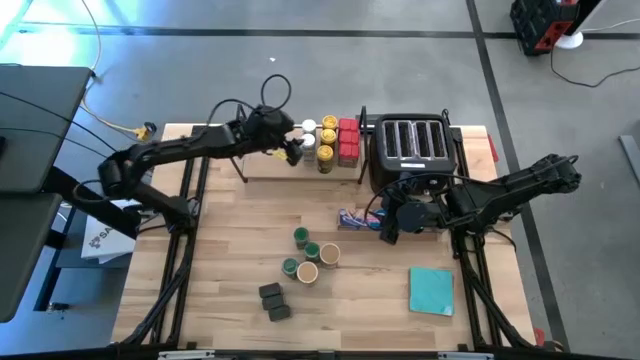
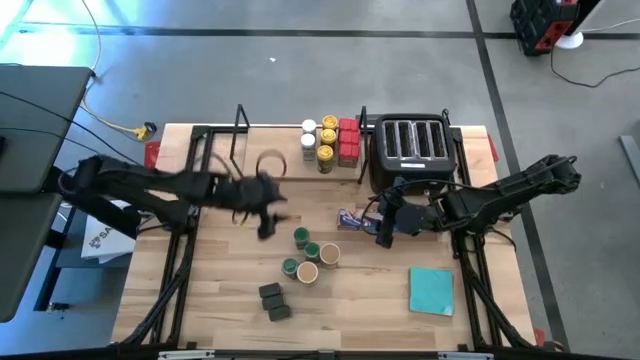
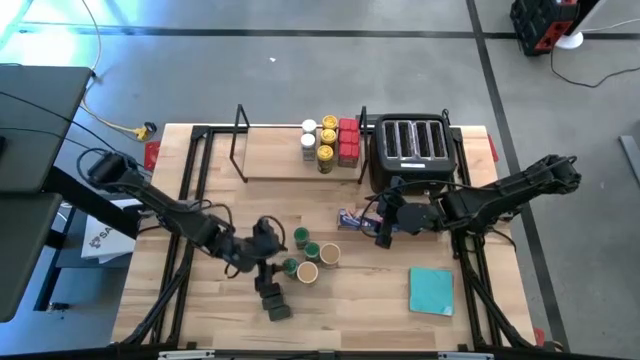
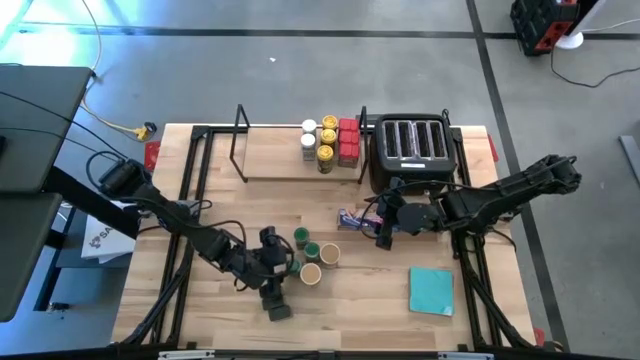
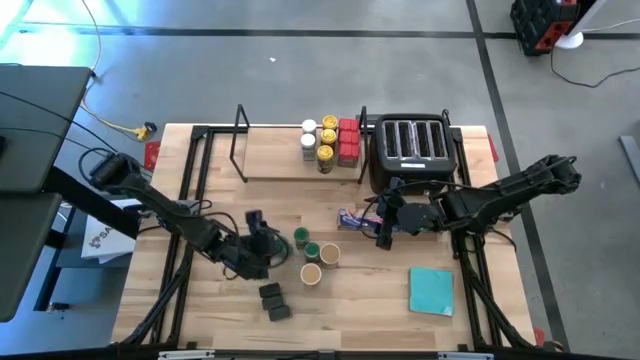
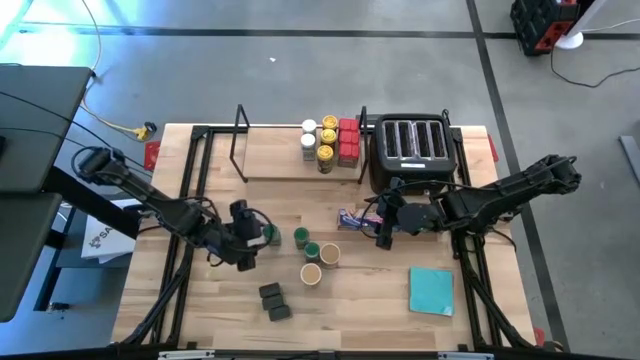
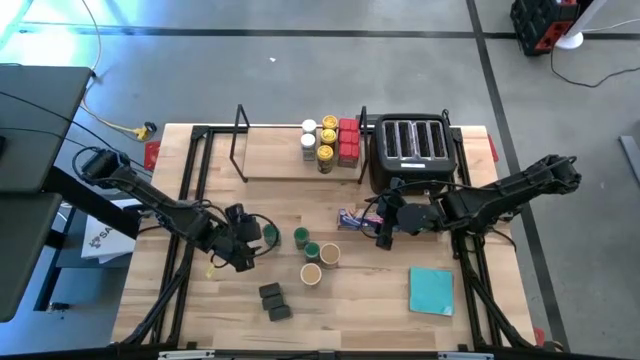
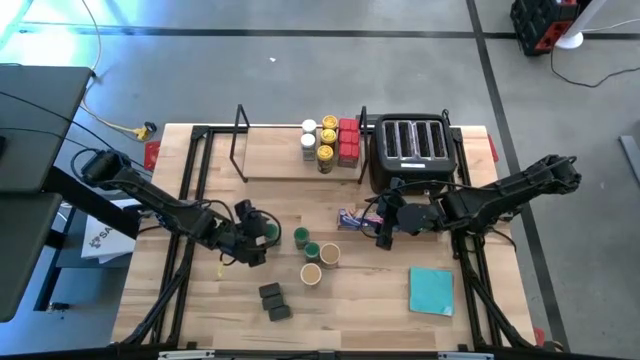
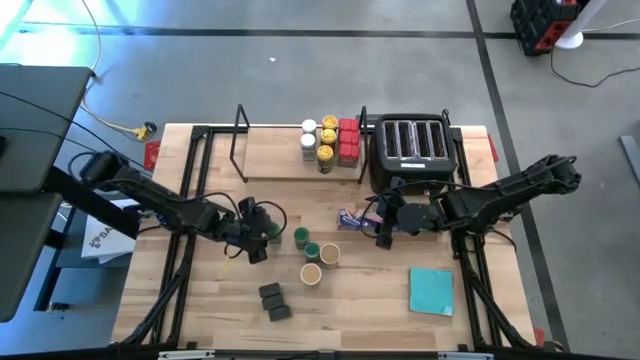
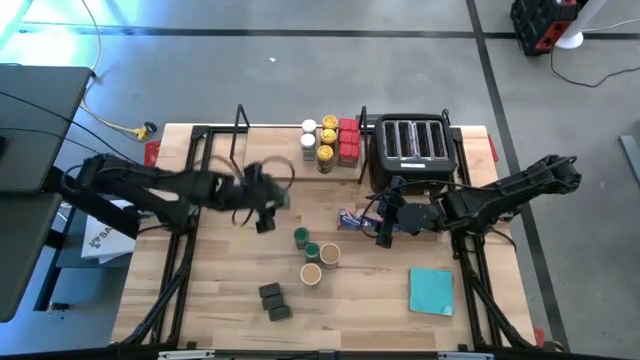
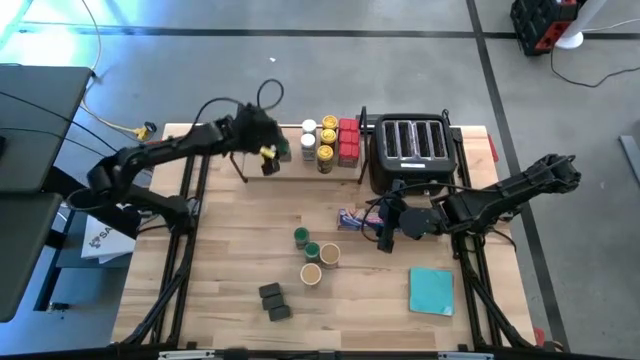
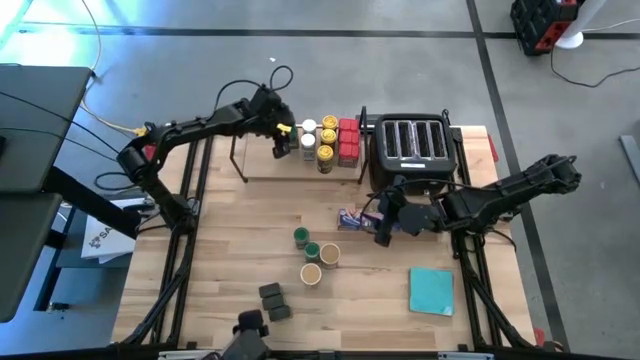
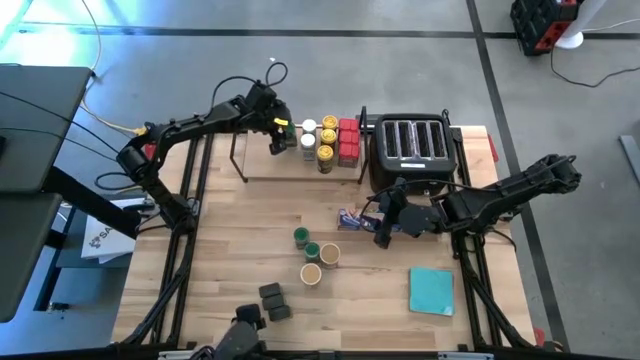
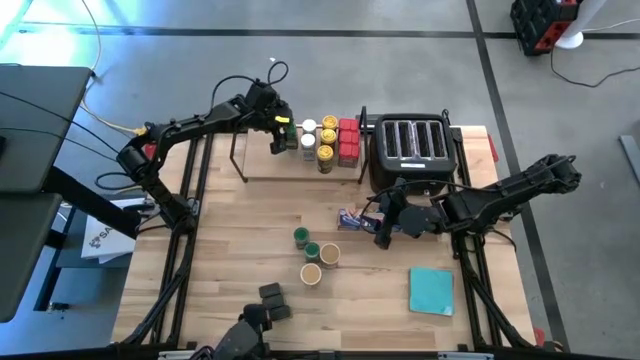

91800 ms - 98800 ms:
Task: Shelf spices
Put the bottom green seasoning bottle on the shelf

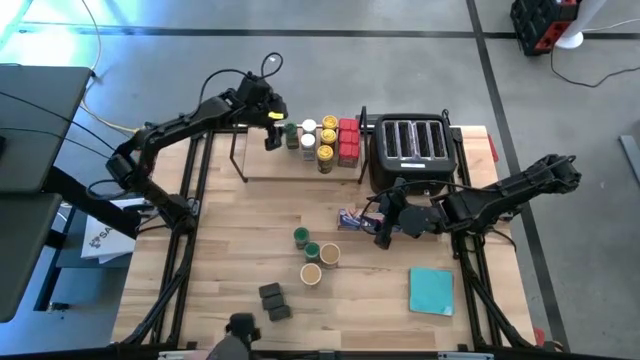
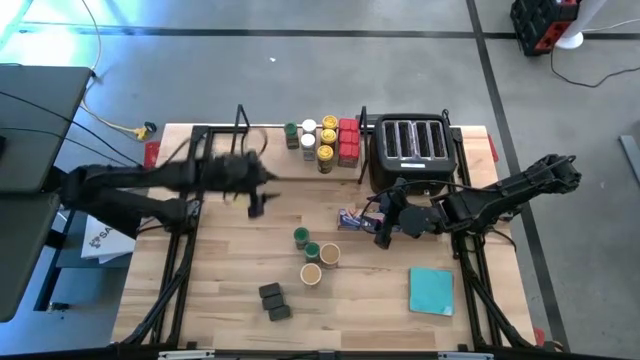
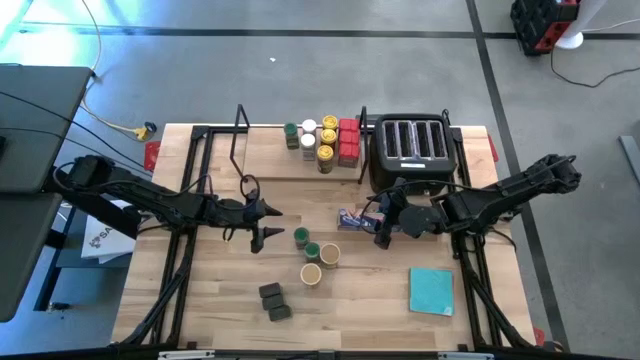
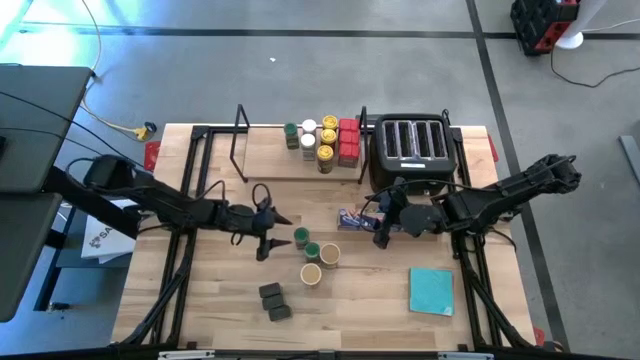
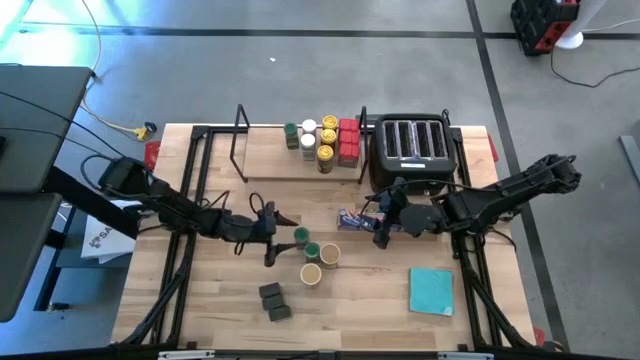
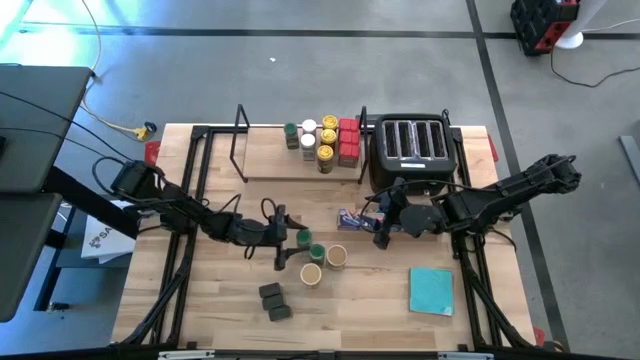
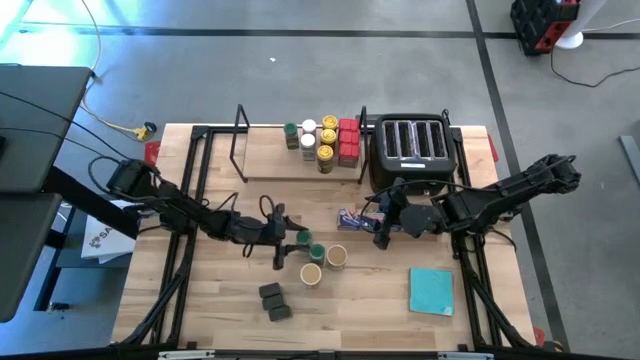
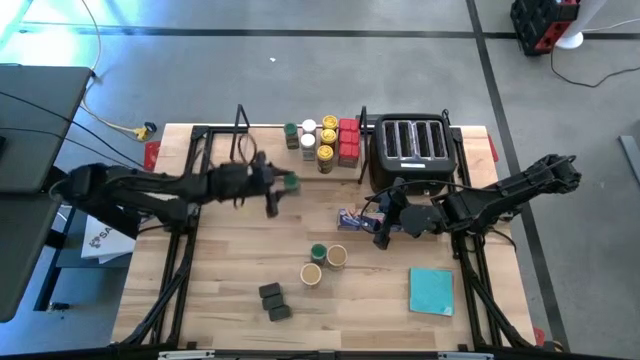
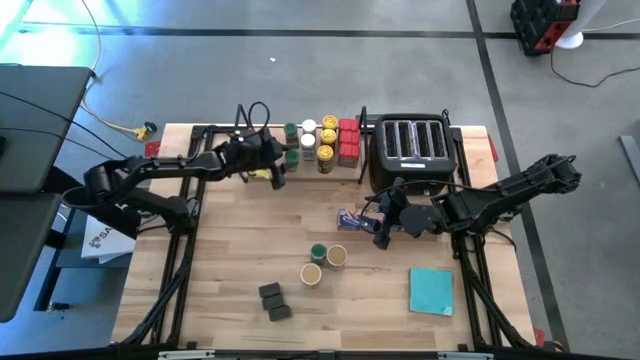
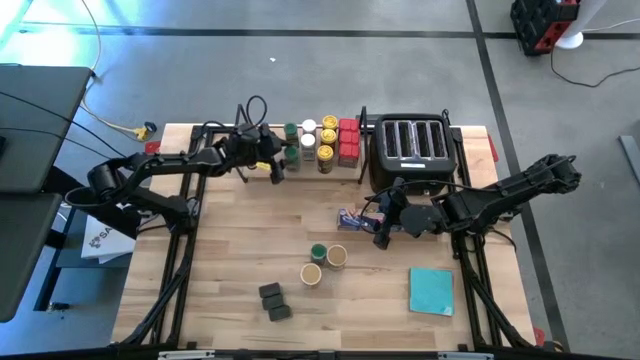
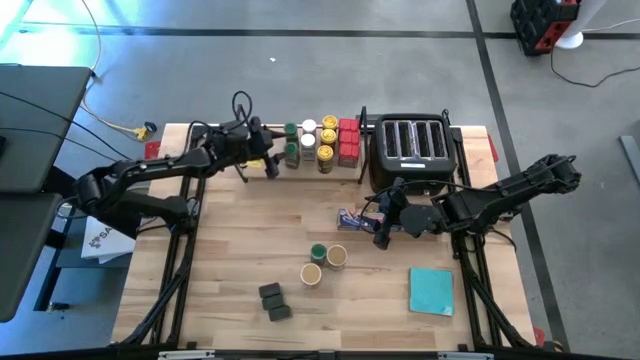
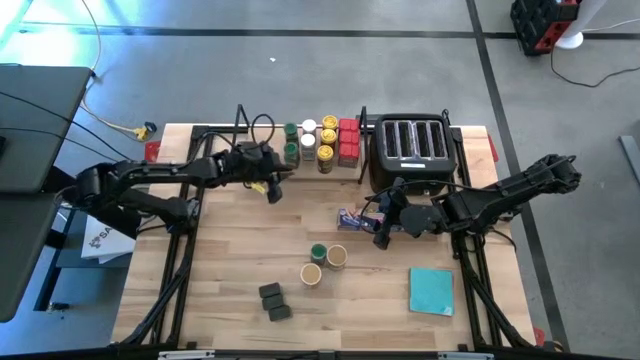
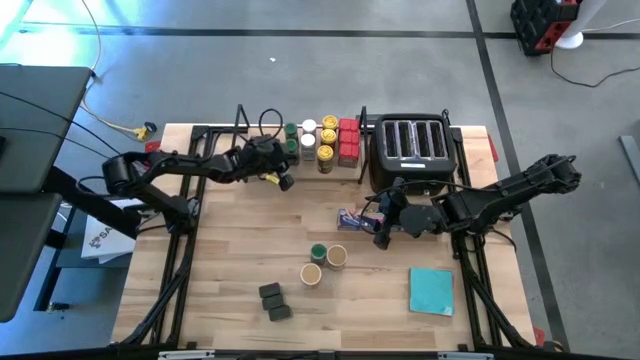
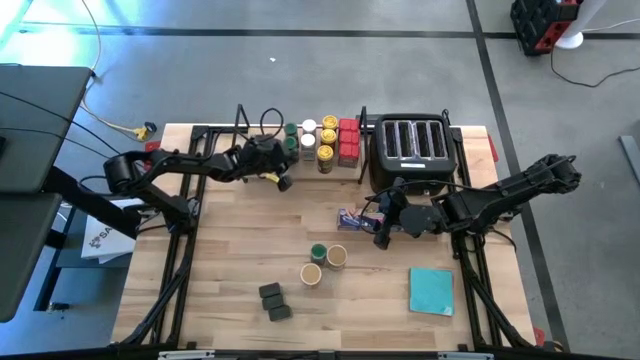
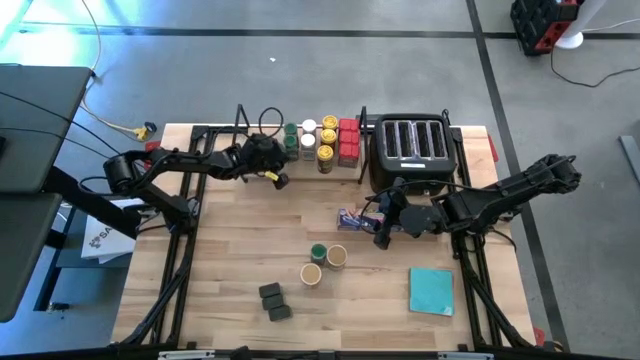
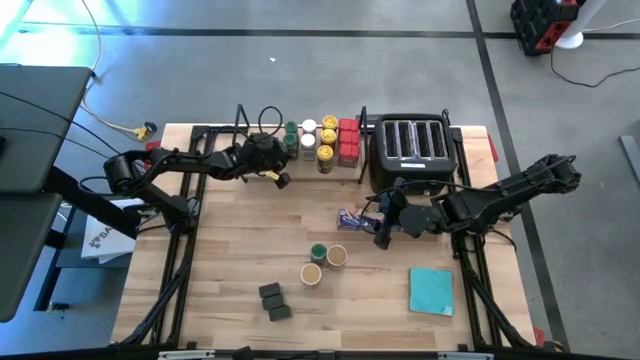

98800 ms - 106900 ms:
Put the top green seasoning bottle on the shelf aligned with the other green seasoning bottle

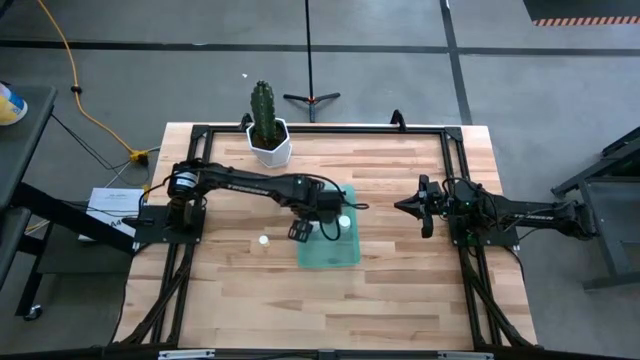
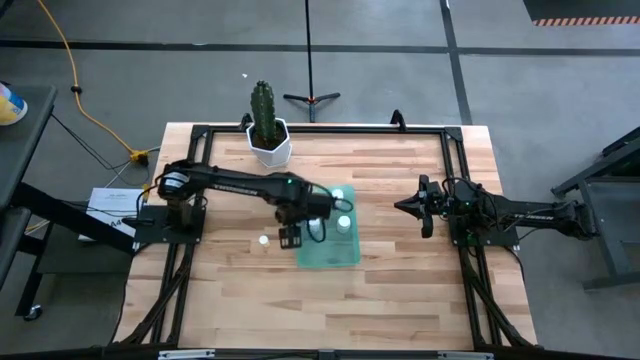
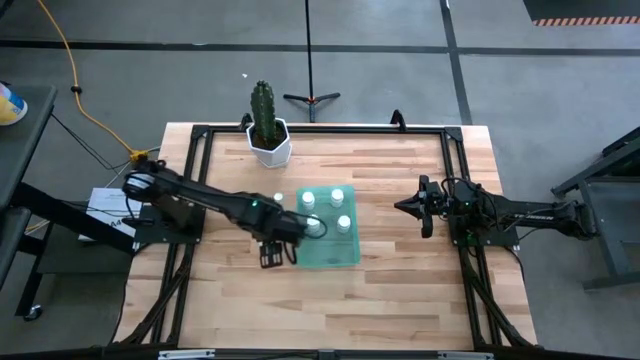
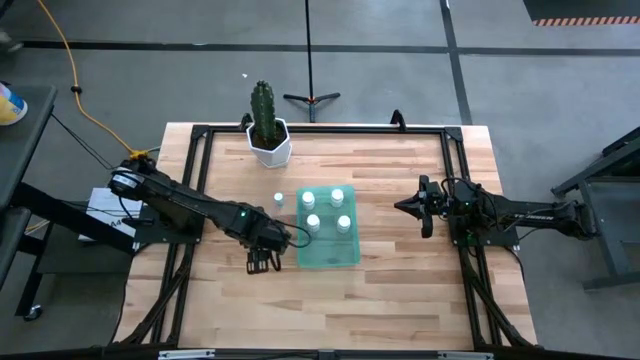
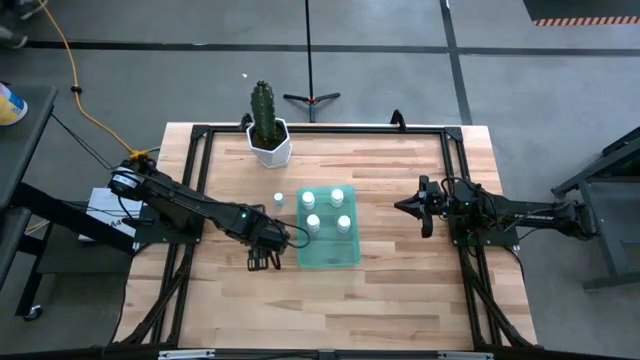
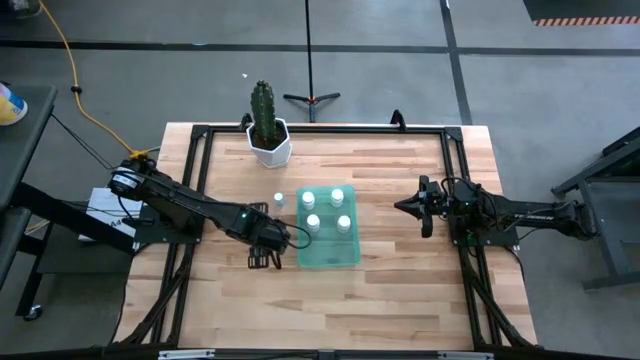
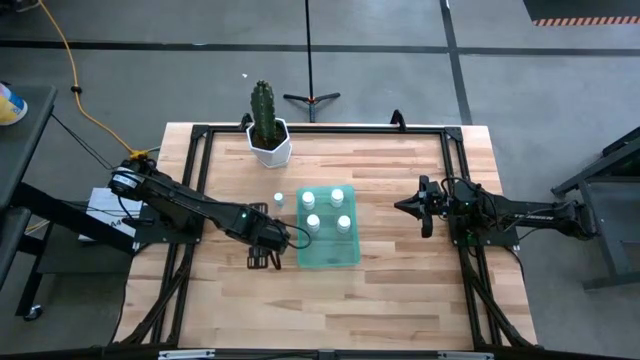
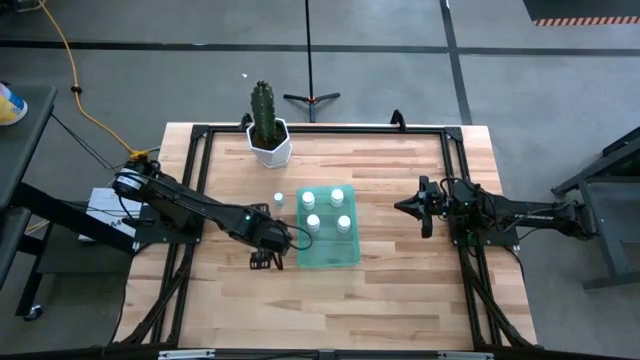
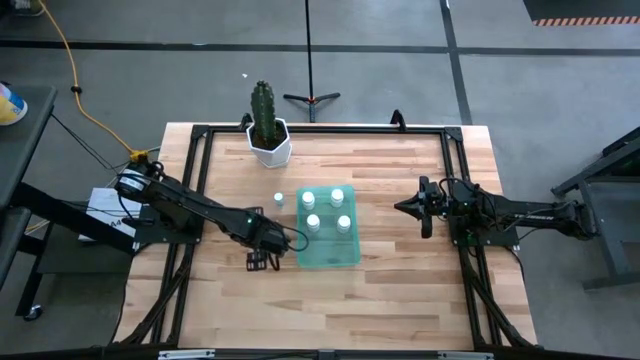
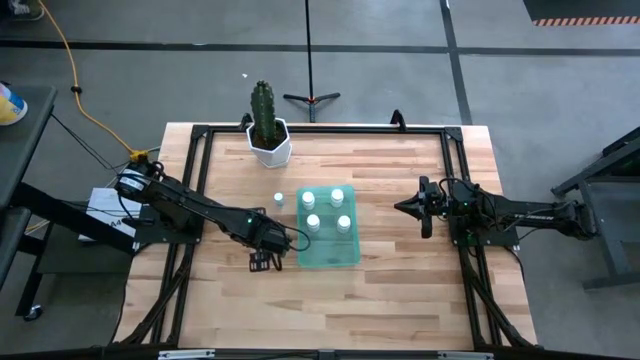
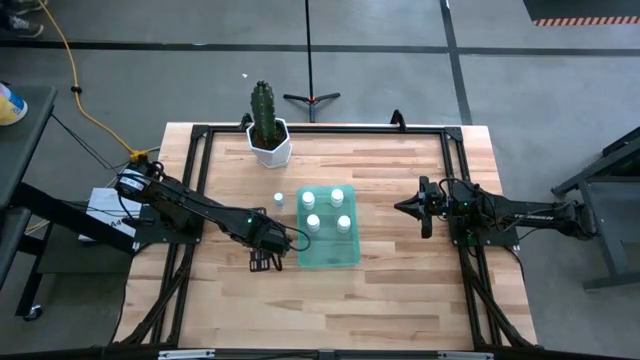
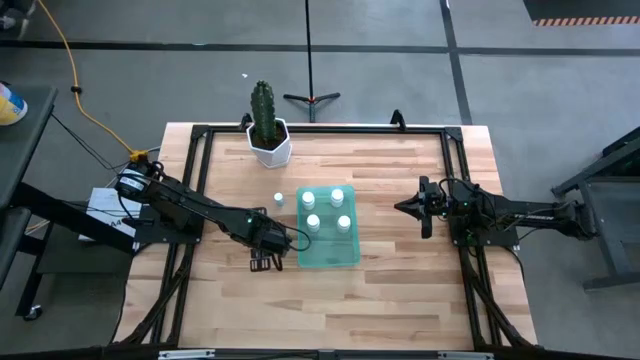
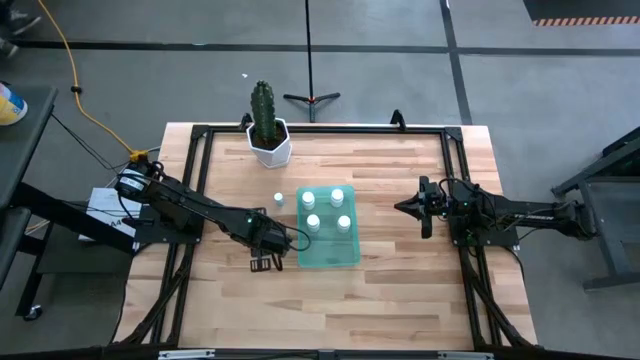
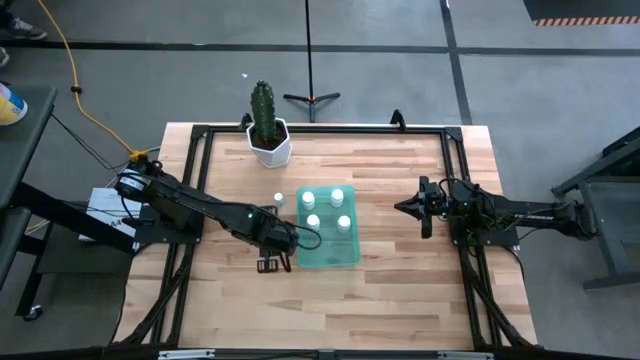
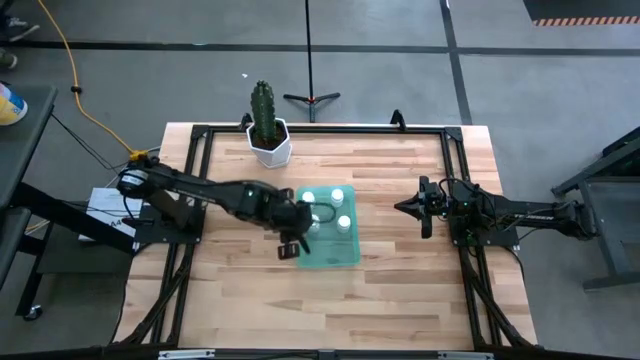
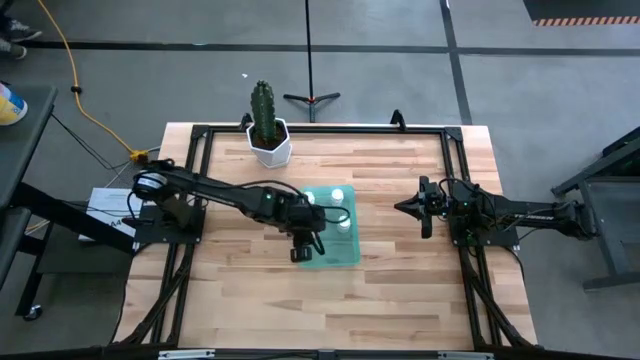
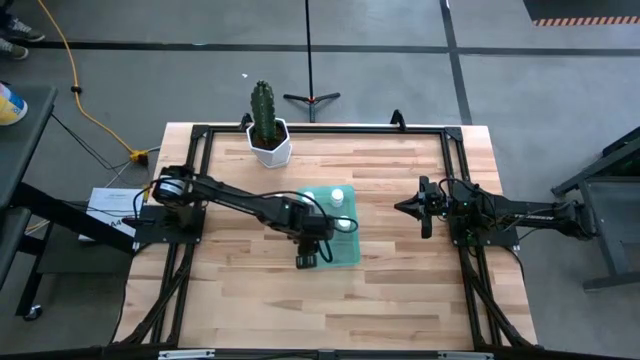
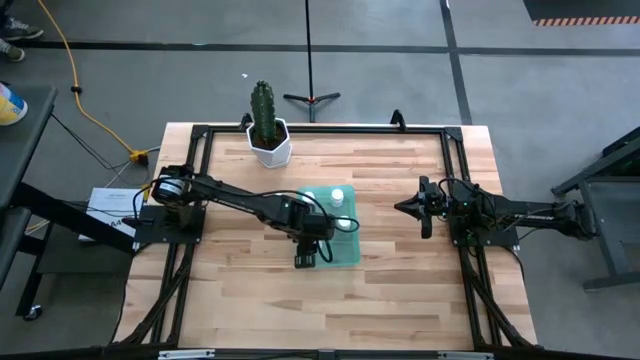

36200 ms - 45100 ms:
Task: Pick and place pill bottles into a basket
Put the yellow pill bottle into the green bin
